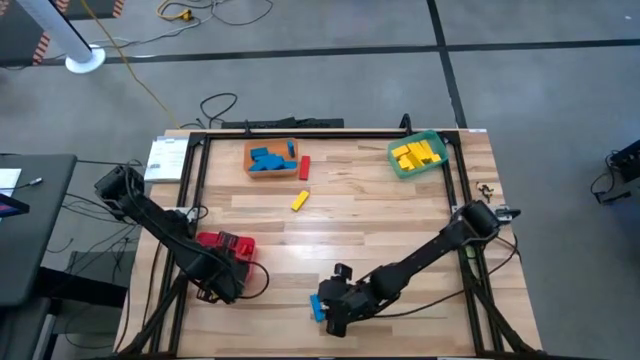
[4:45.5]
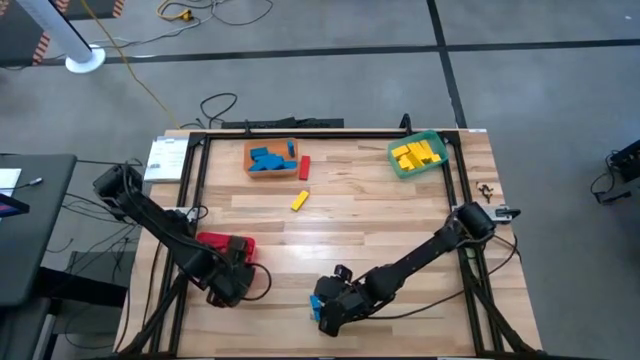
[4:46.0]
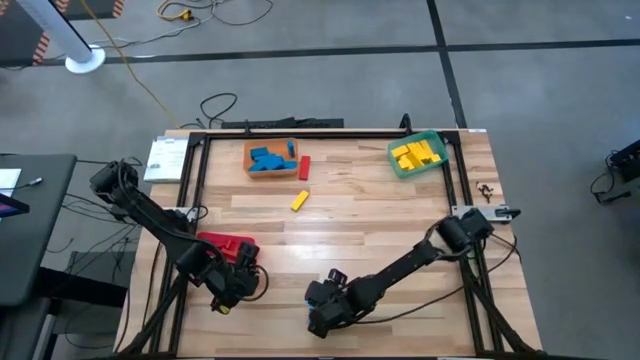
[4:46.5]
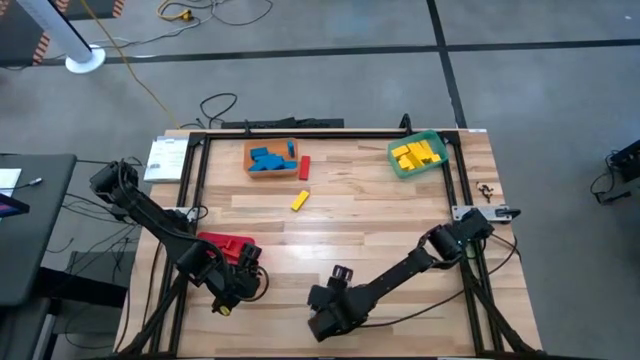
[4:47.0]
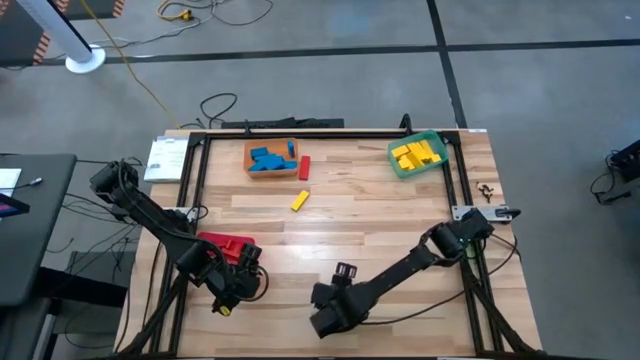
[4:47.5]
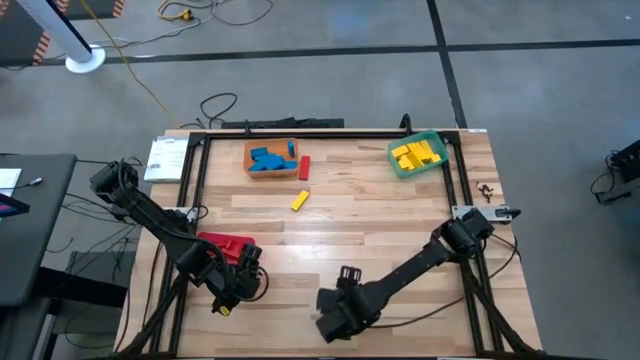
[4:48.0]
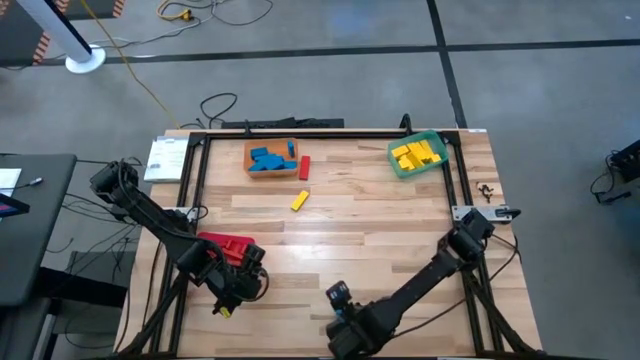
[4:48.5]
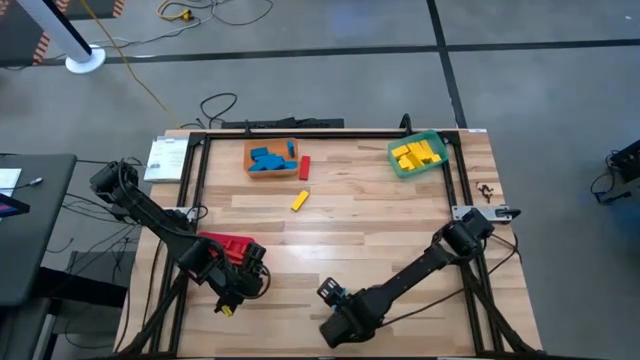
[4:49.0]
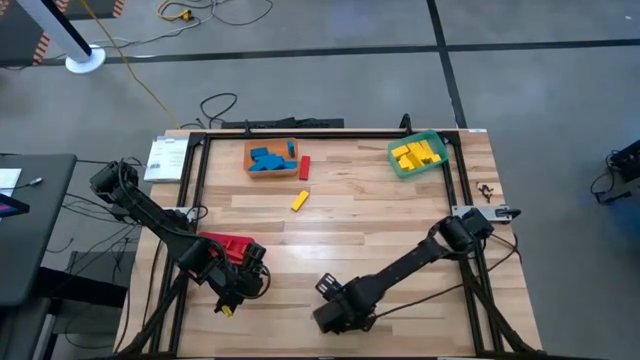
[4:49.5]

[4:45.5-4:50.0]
Task: Sort blocks
Put the blue block into the orange bin

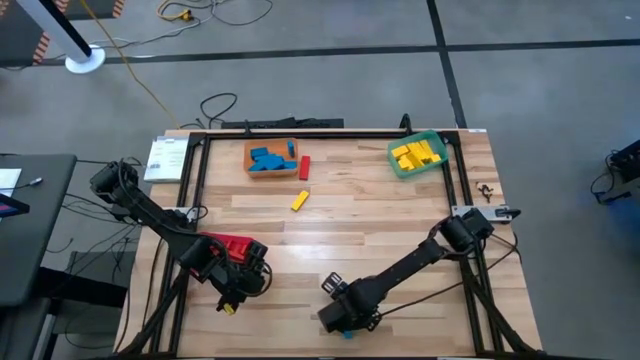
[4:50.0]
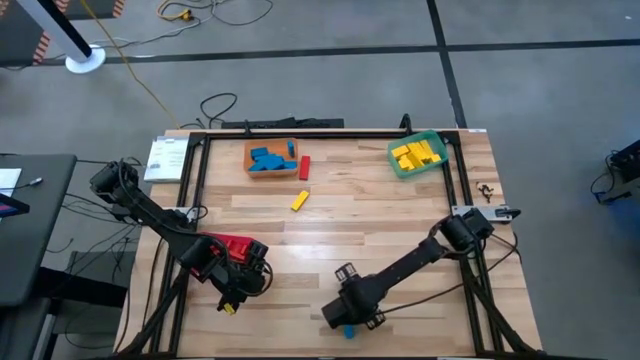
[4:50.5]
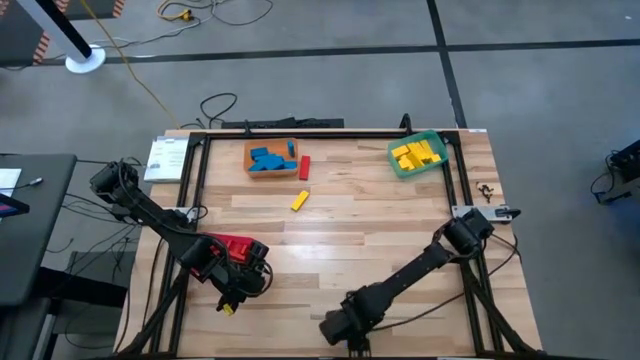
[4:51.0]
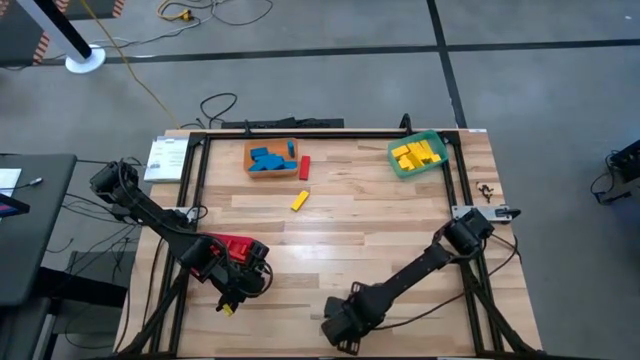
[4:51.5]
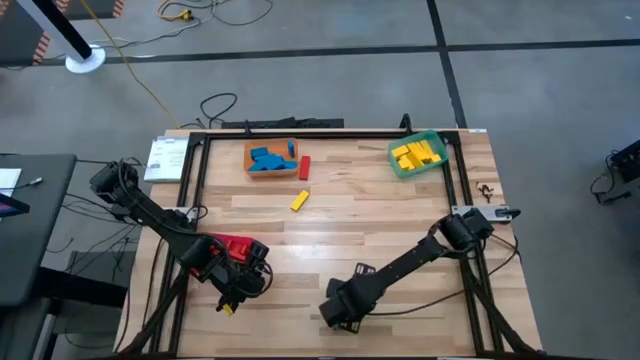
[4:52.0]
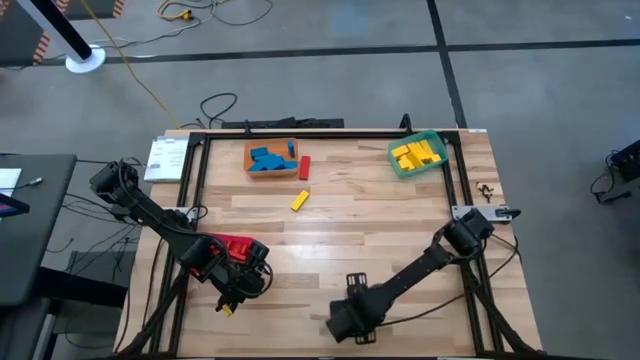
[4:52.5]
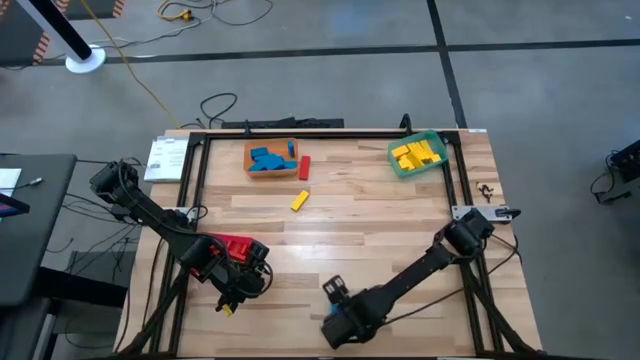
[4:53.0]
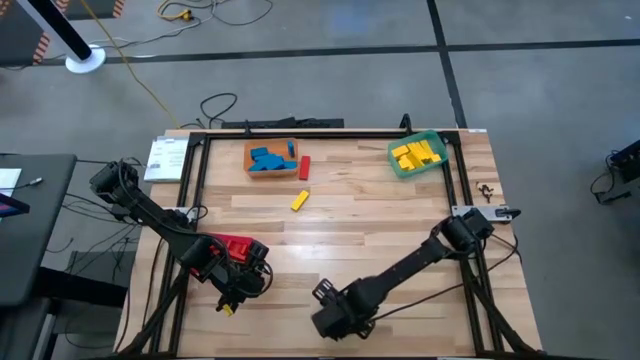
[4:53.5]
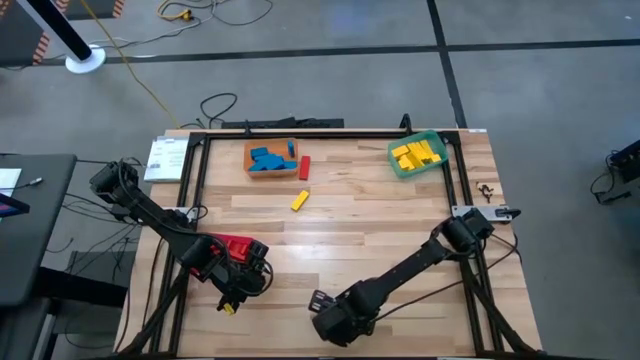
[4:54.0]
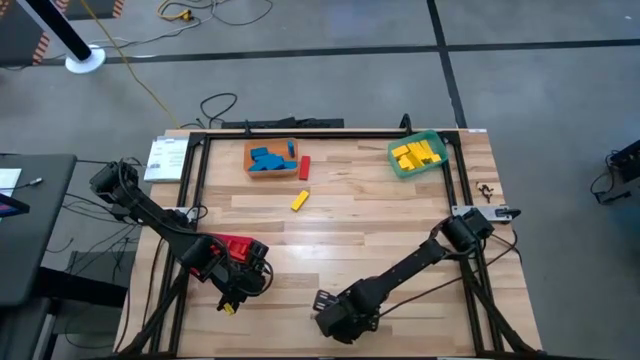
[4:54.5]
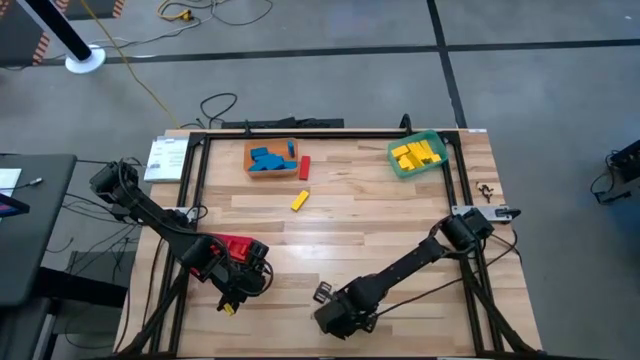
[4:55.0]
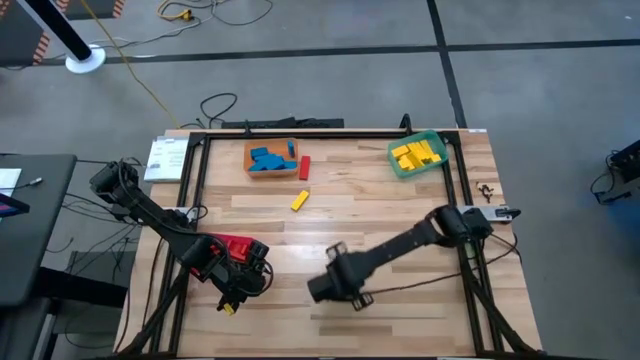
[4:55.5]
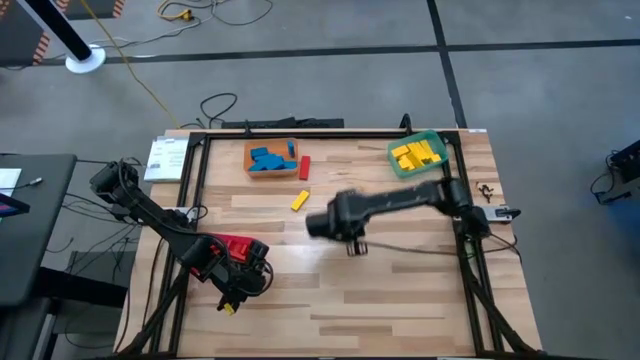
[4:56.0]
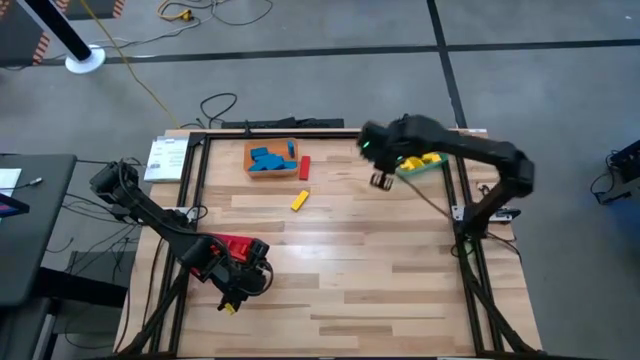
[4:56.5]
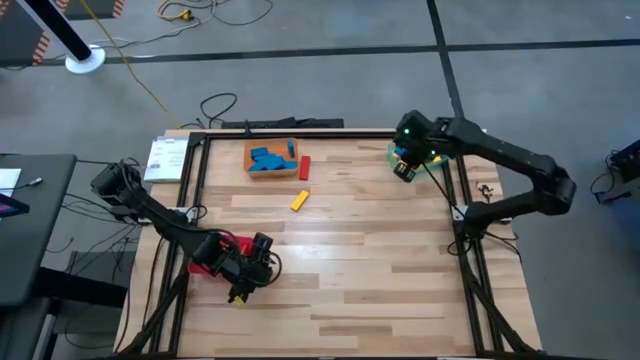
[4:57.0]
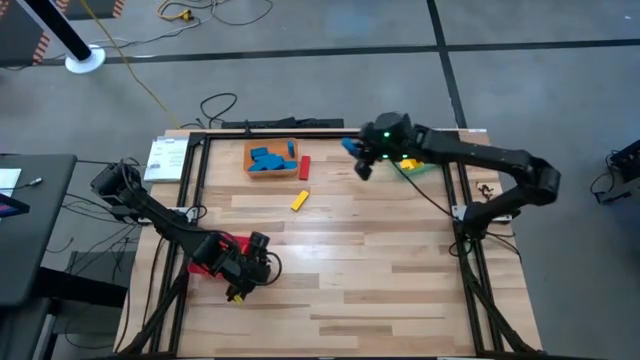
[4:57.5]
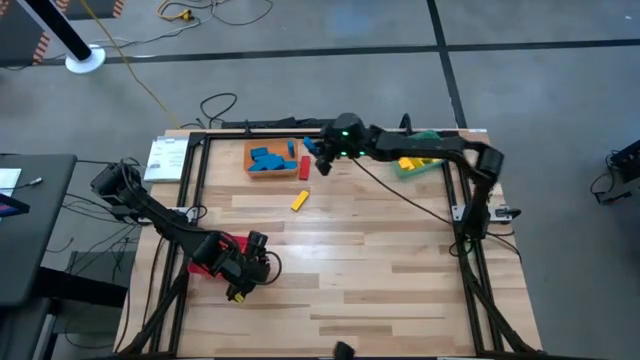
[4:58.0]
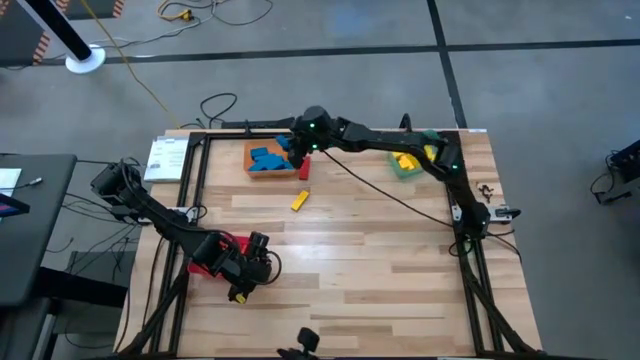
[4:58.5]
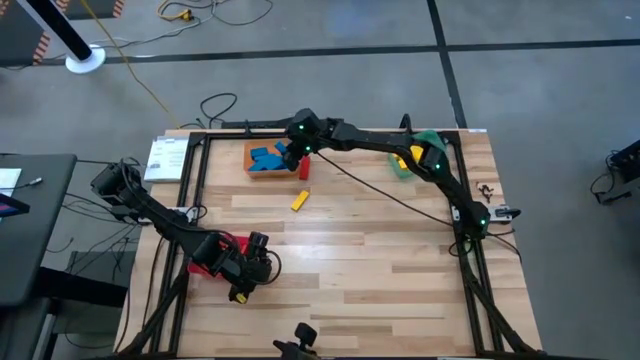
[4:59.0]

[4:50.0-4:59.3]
Put the blue block into the orange bin

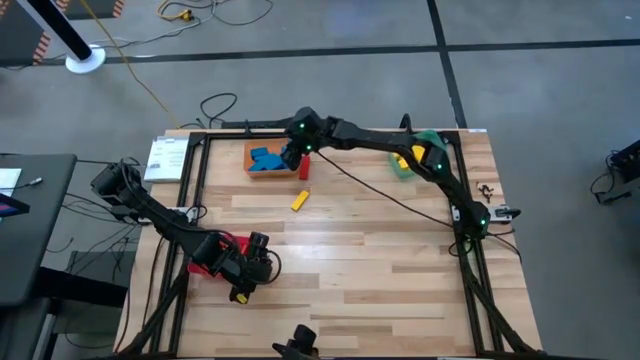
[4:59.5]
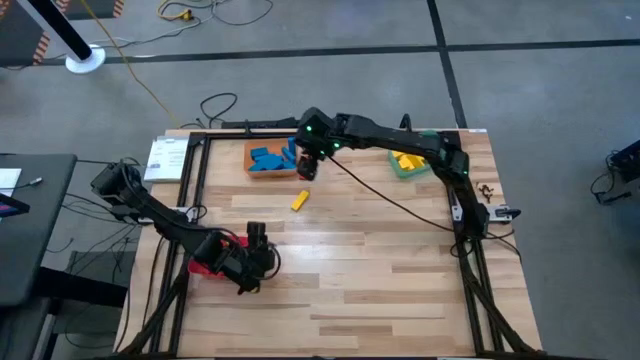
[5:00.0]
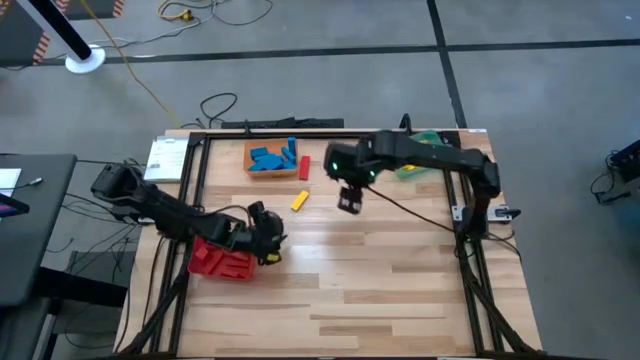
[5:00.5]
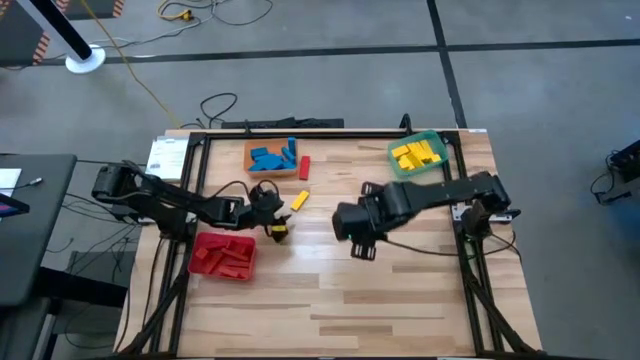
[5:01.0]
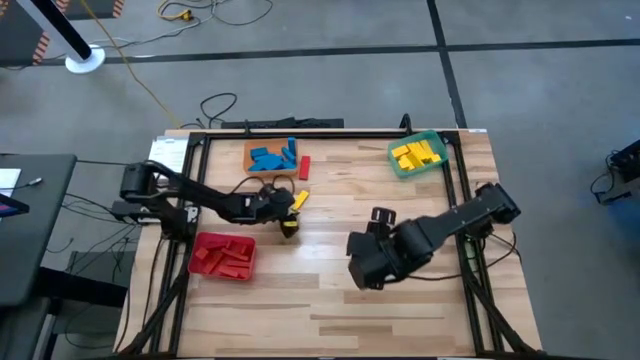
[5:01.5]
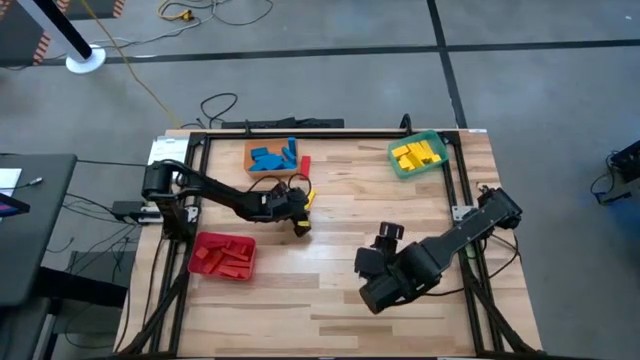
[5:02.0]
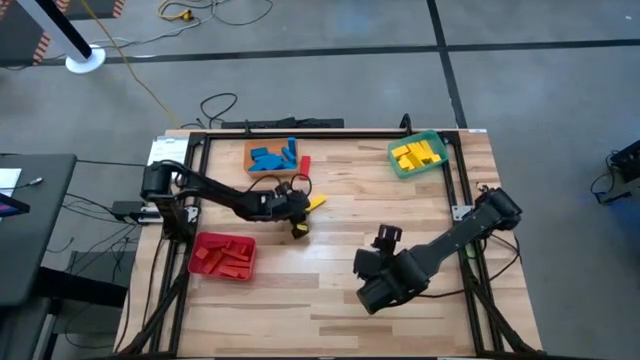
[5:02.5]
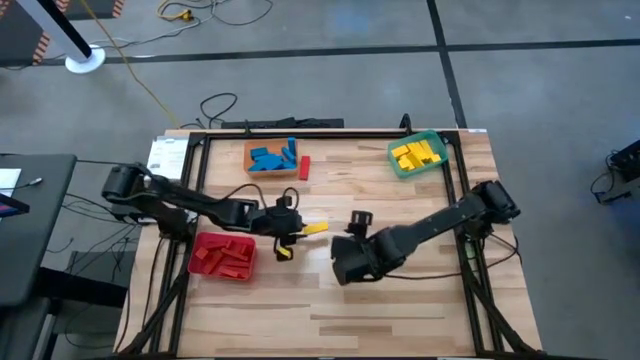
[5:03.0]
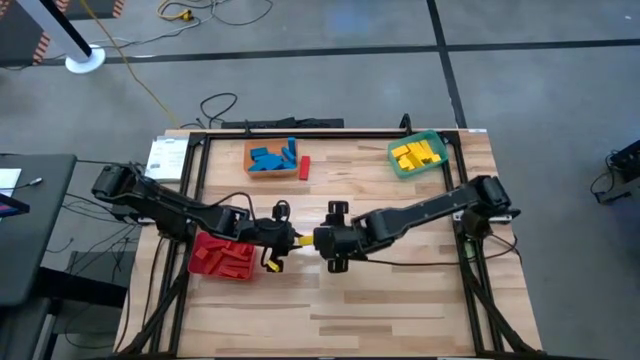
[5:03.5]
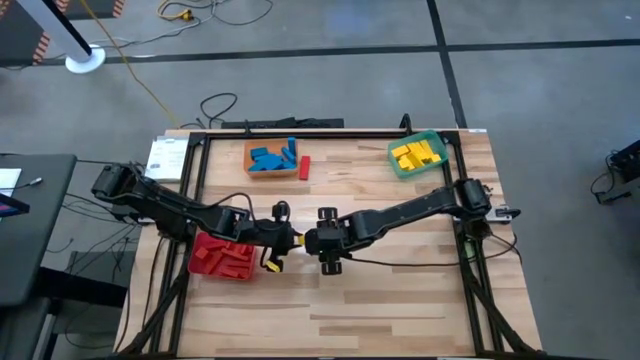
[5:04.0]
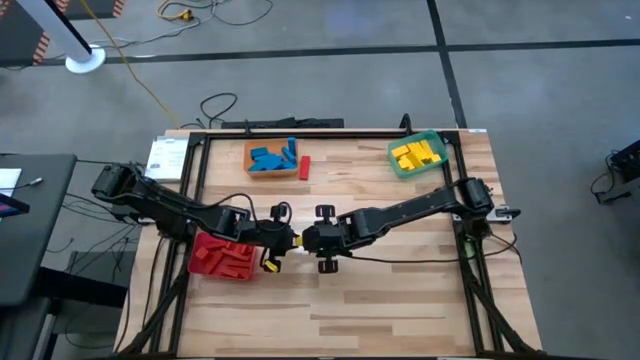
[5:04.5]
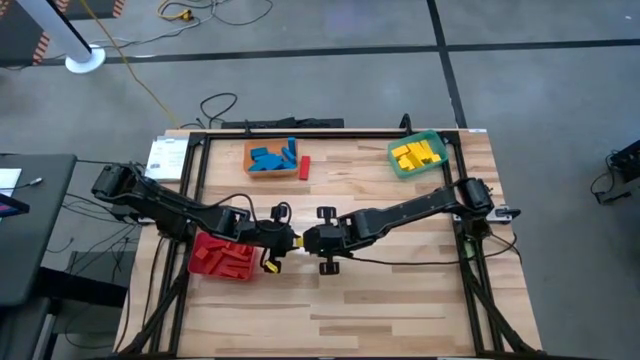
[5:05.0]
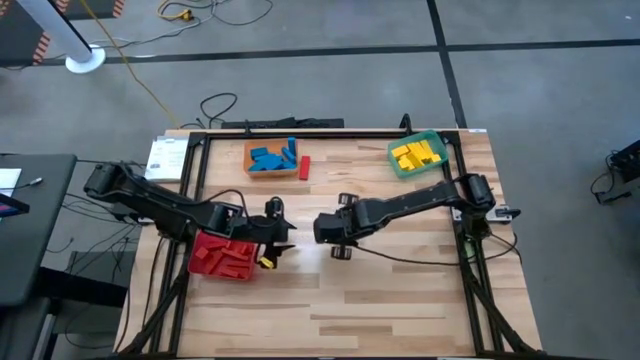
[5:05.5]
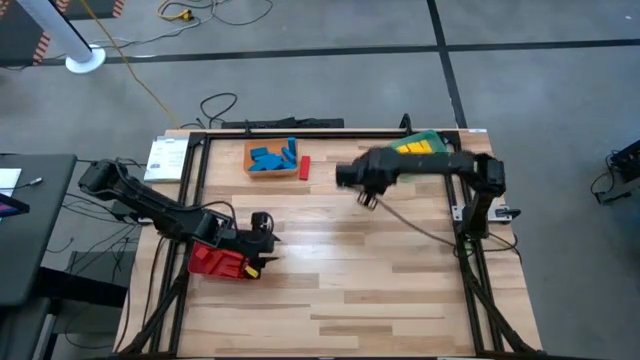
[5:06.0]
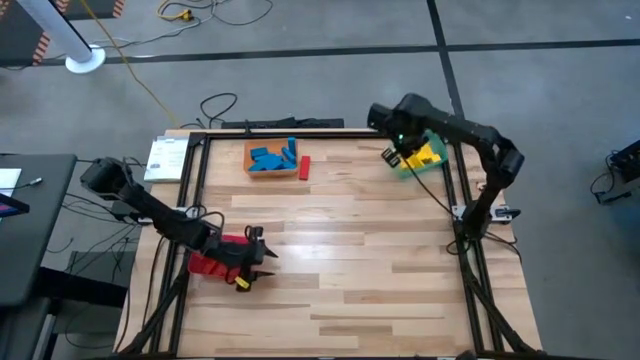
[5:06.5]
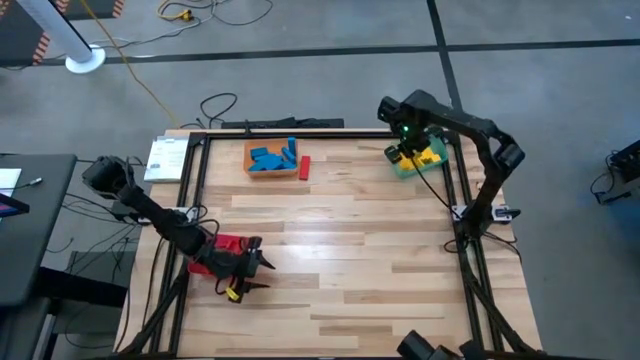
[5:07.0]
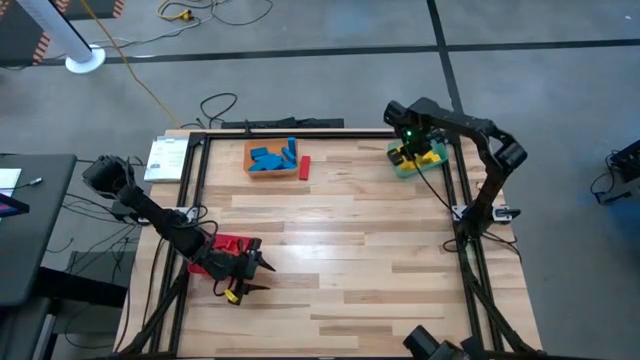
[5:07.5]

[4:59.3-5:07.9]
Put the yellow block into the green bin
